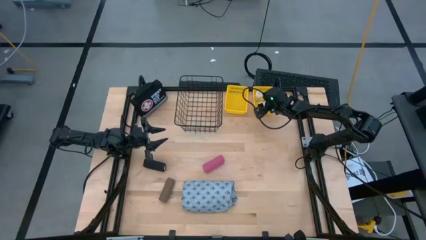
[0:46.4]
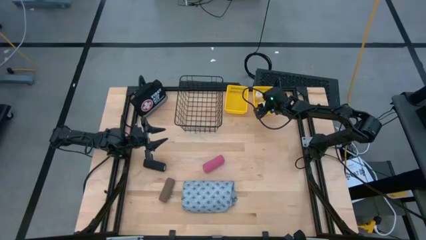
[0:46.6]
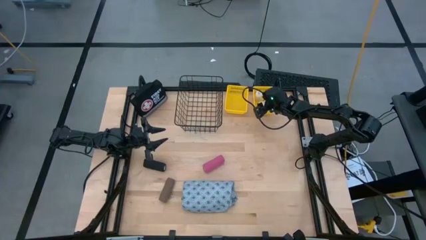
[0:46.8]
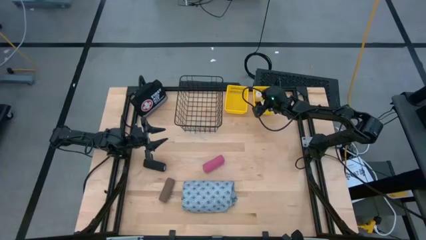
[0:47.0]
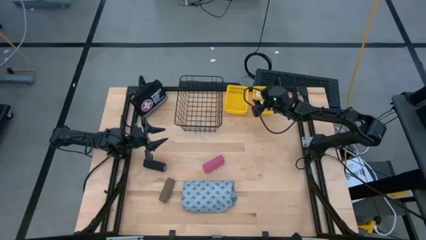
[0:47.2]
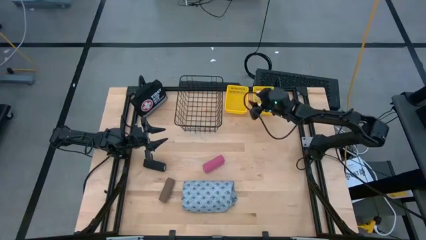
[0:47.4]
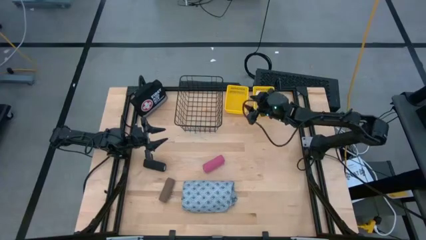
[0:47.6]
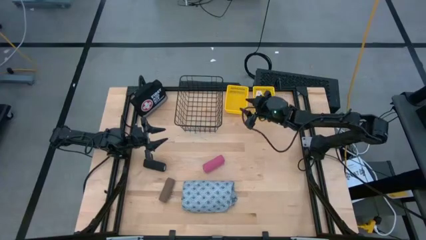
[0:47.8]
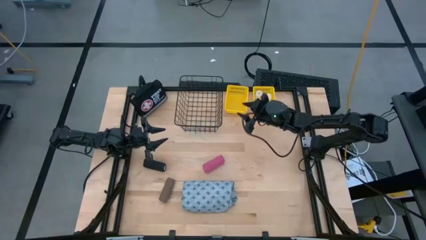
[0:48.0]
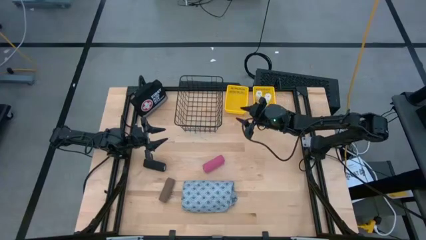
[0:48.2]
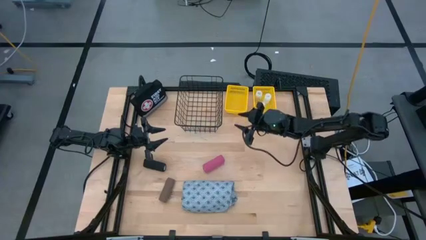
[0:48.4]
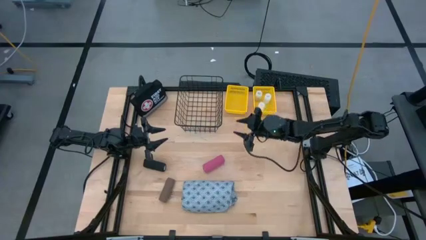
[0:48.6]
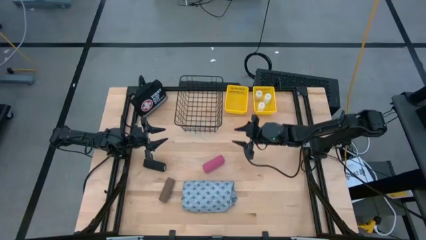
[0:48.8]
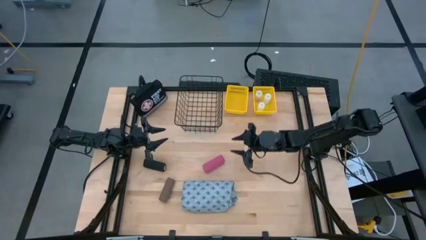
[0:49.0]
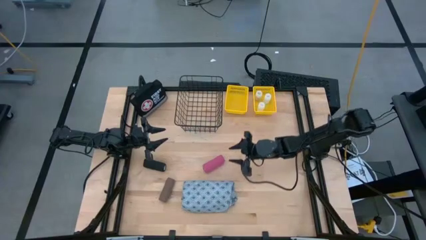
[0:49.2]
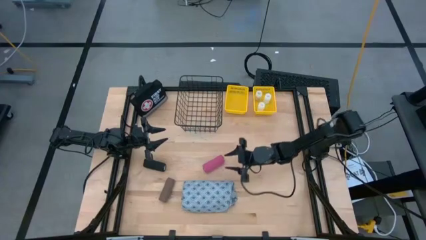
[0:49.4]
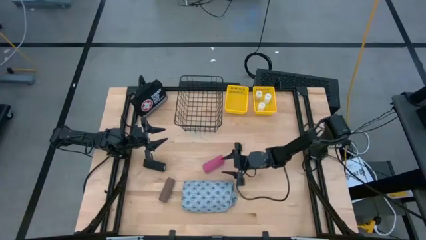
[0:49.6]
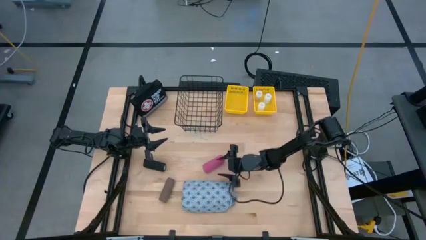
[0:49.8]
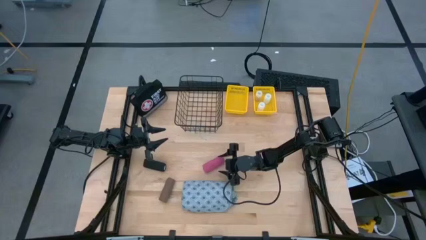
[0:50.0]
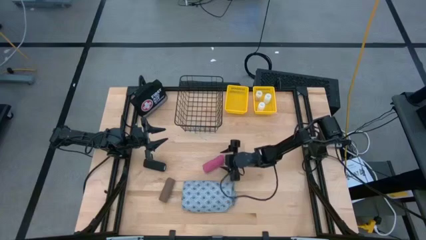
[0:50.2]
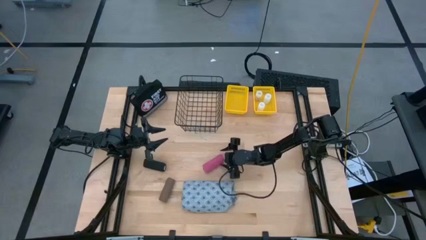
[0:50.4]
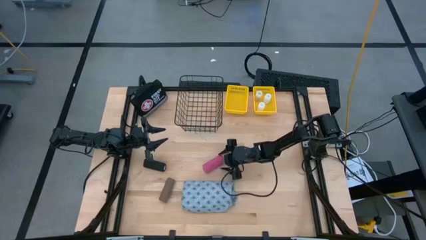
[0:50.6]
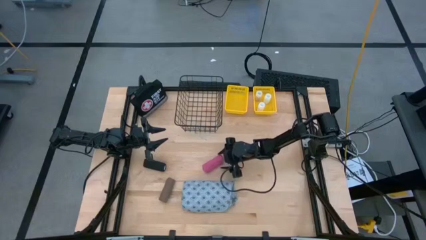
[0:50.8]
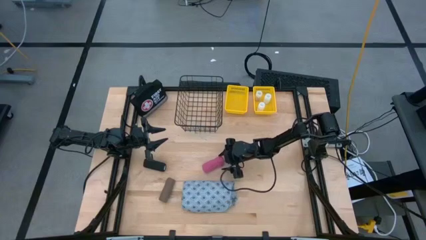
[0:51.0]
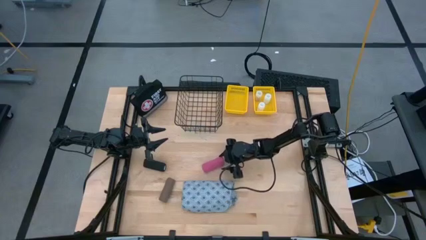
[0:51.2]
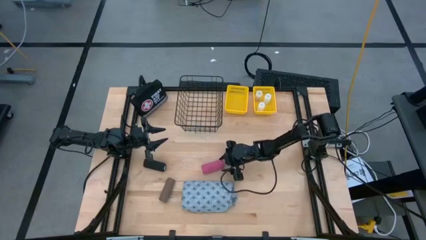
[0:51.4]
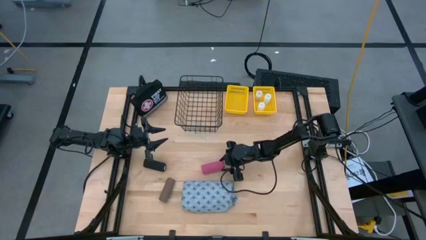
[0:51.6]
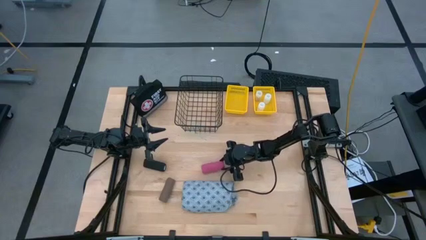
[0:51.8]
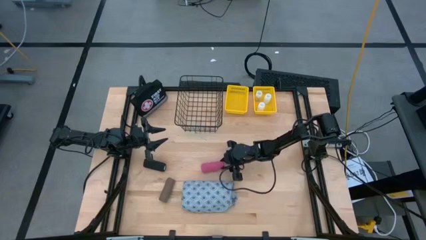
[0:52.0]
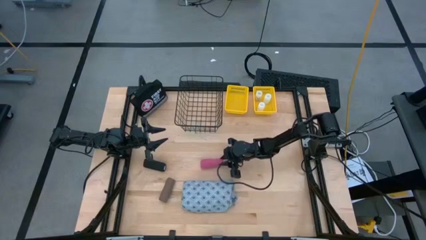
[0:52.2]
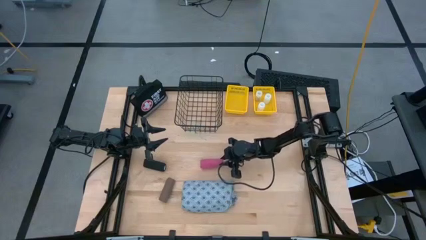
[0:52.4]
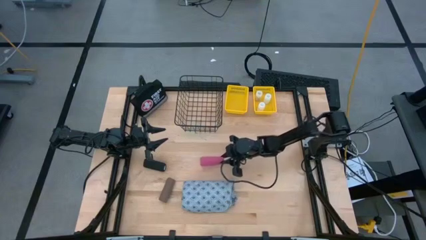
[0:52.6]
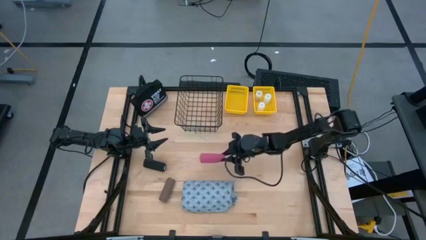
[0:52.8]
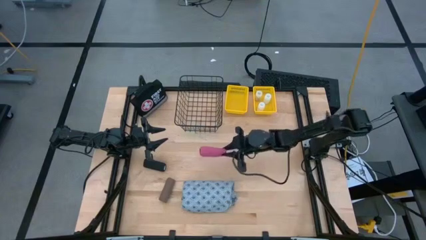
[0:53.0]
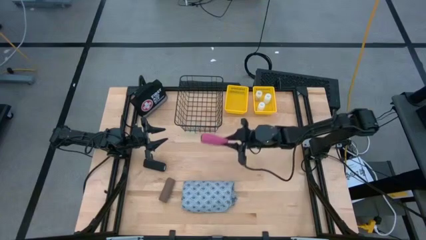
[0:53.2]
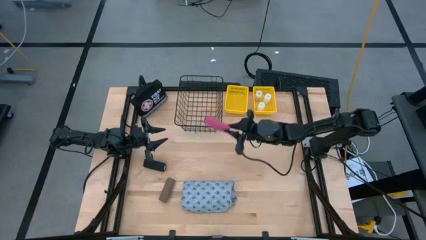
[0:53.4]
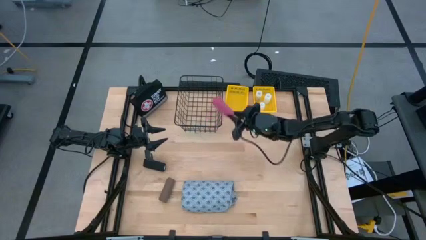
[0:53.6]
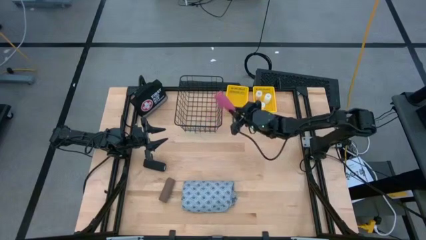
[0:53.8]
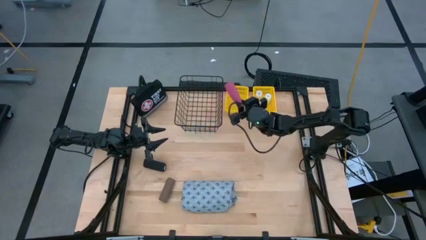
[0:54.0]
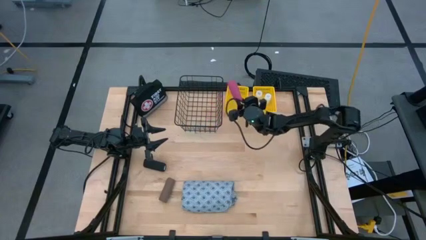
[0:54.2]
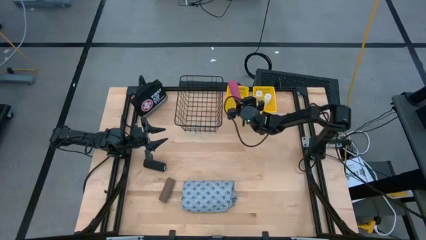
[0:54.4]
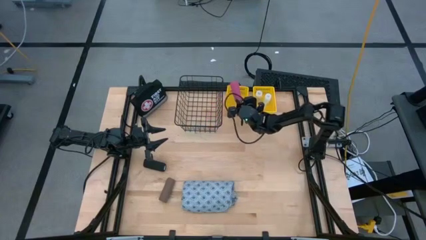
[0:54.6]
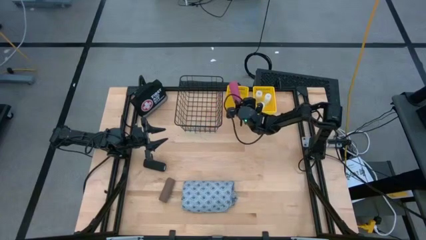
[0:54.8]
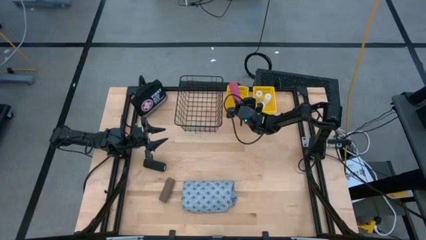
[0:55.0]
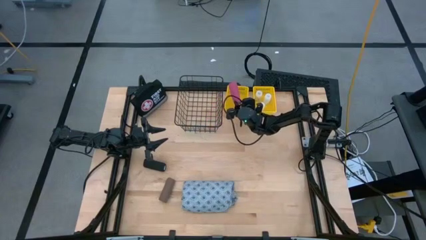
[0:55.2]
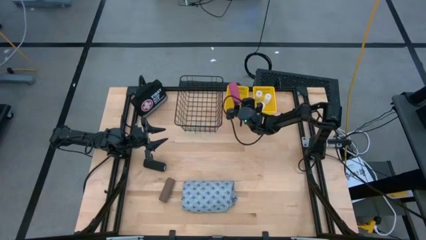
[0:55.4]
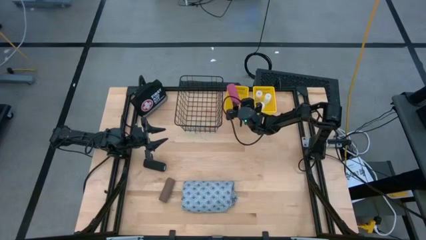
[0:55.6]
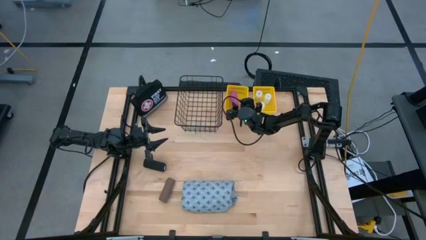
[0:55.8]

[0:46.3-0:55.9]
Task: Pick & Place Medicine items
Put the pink bandage into the left yellow basket

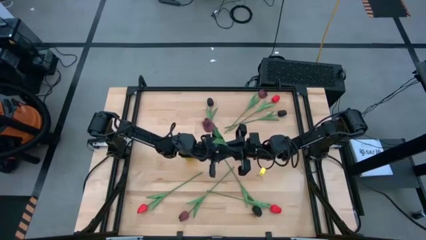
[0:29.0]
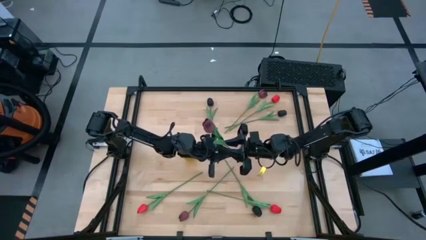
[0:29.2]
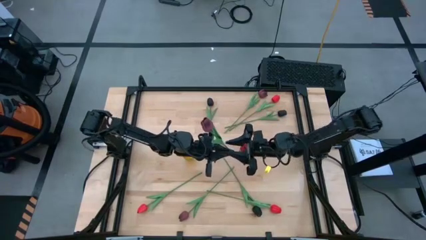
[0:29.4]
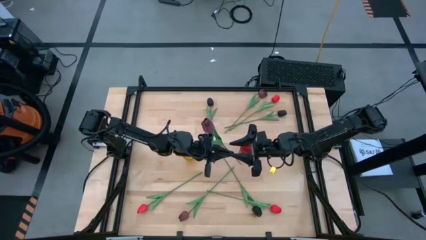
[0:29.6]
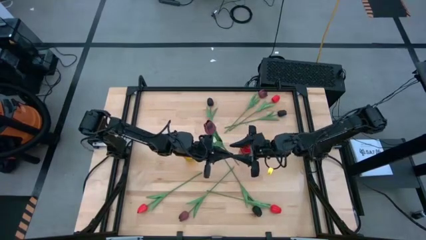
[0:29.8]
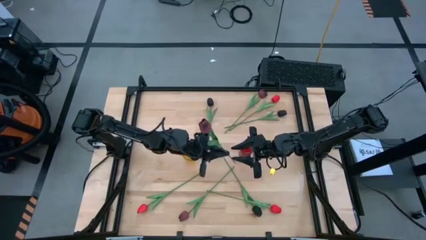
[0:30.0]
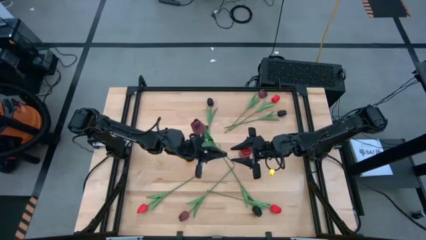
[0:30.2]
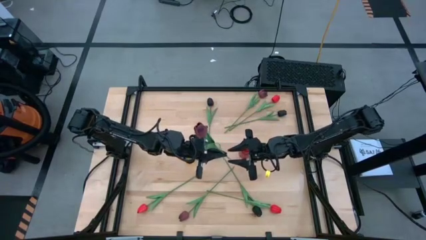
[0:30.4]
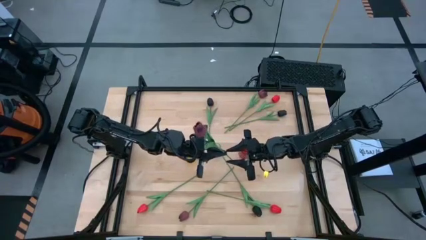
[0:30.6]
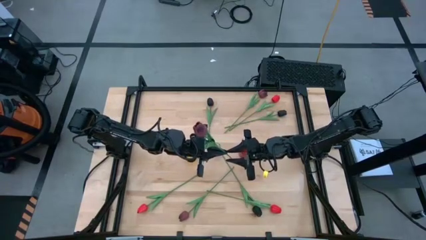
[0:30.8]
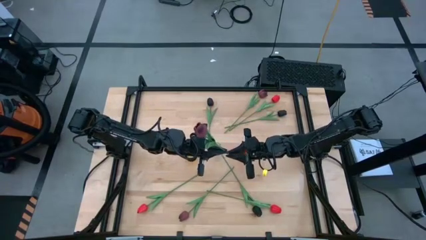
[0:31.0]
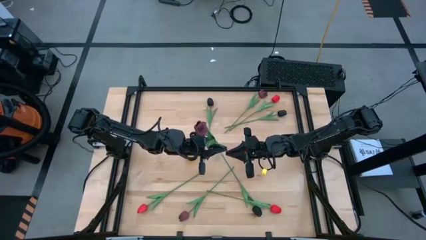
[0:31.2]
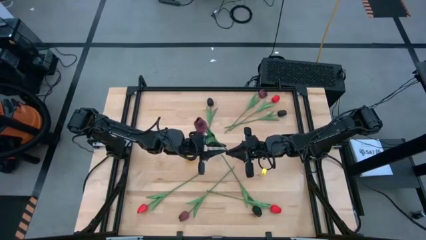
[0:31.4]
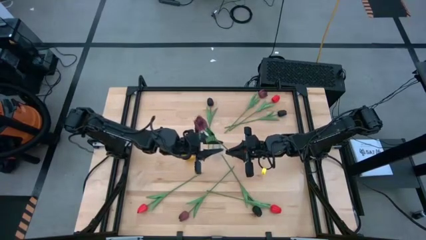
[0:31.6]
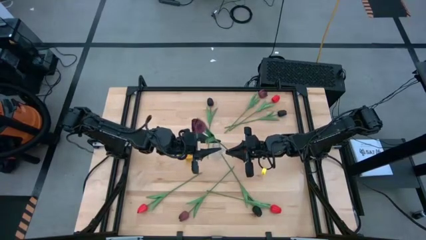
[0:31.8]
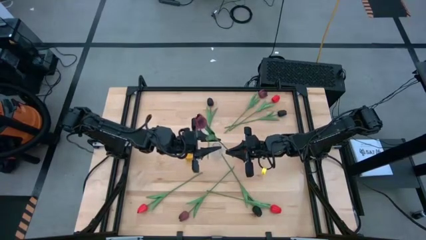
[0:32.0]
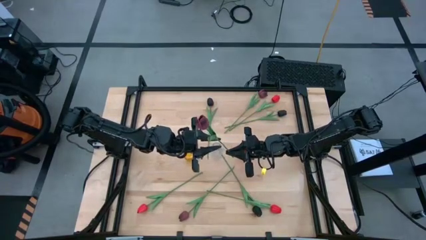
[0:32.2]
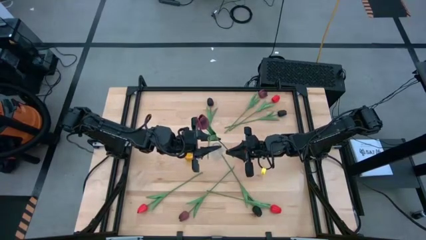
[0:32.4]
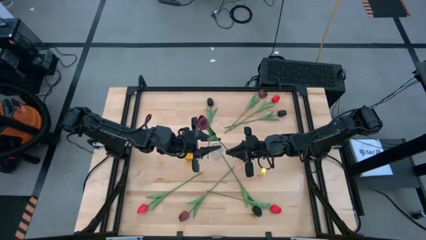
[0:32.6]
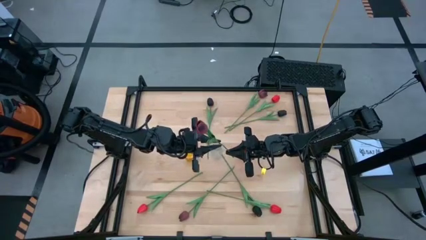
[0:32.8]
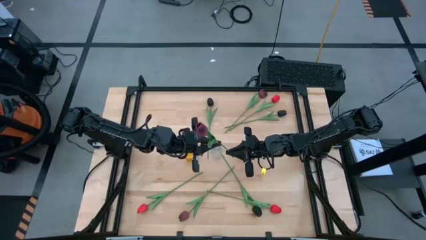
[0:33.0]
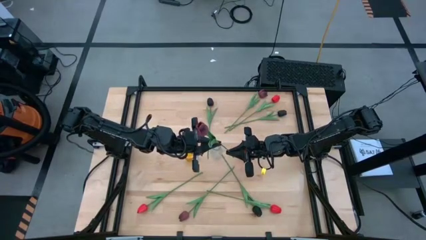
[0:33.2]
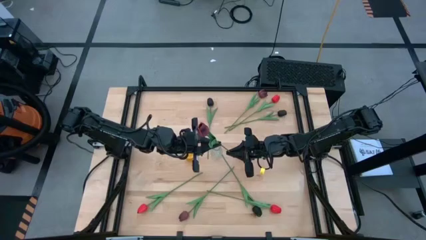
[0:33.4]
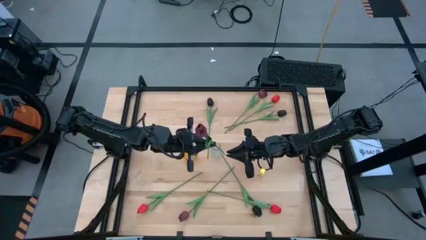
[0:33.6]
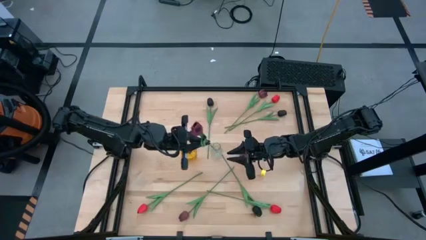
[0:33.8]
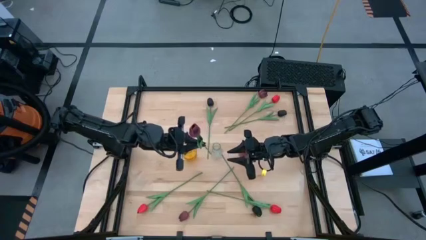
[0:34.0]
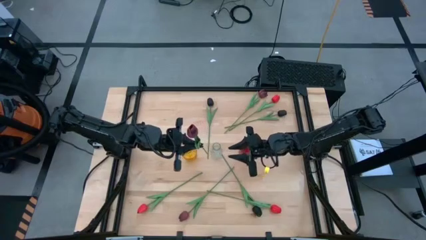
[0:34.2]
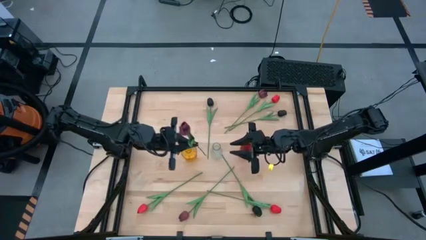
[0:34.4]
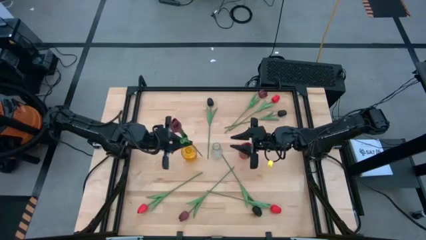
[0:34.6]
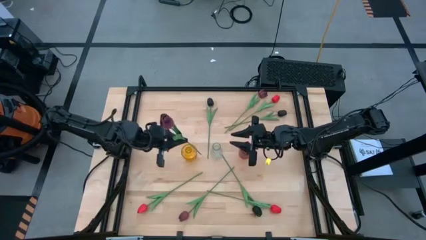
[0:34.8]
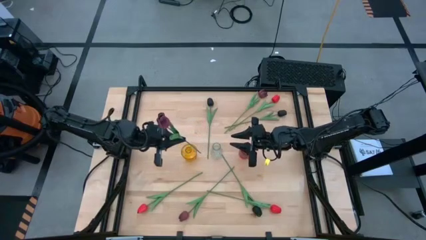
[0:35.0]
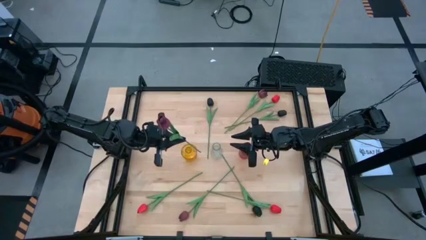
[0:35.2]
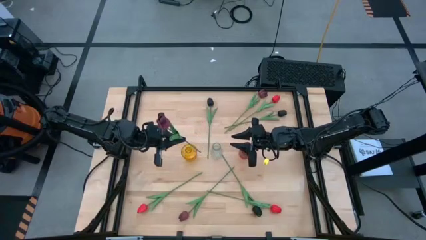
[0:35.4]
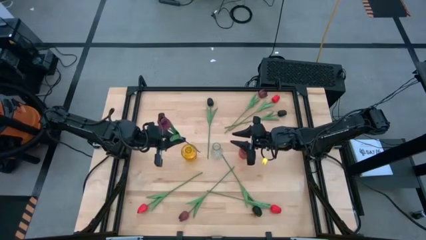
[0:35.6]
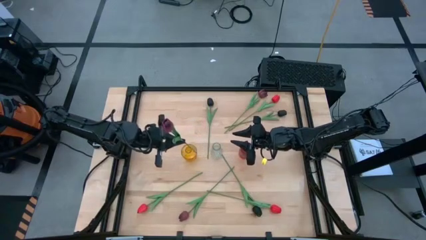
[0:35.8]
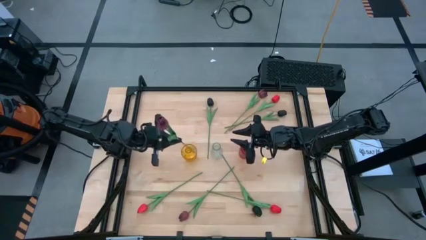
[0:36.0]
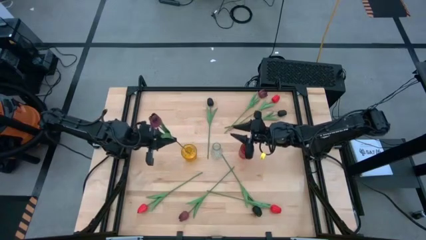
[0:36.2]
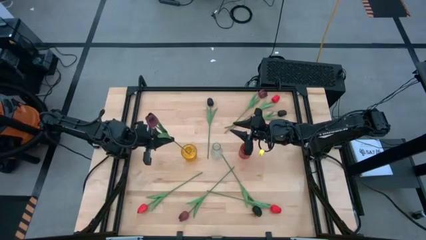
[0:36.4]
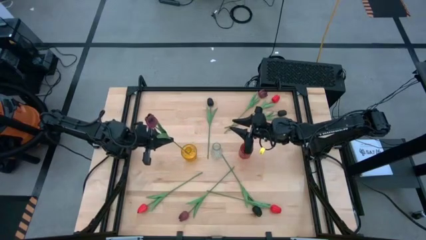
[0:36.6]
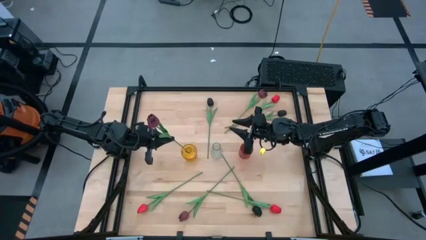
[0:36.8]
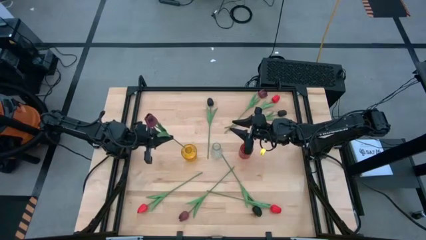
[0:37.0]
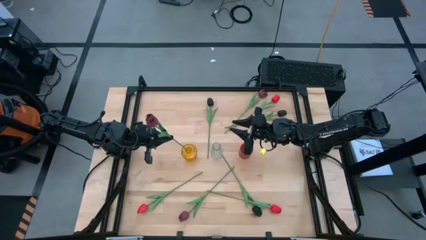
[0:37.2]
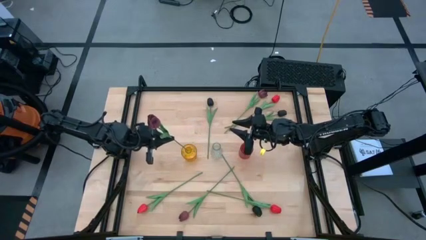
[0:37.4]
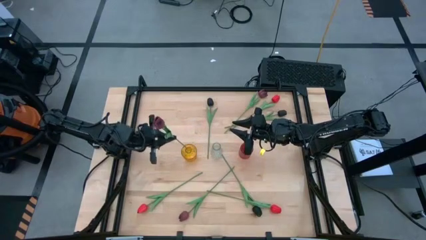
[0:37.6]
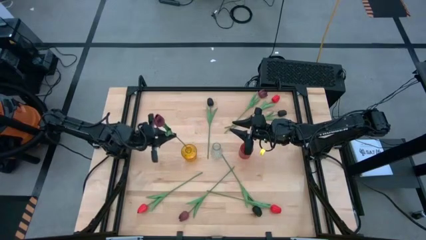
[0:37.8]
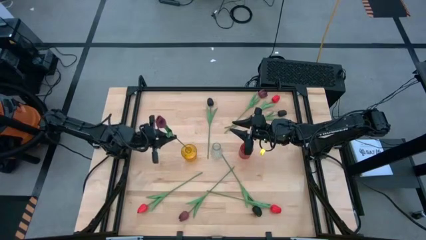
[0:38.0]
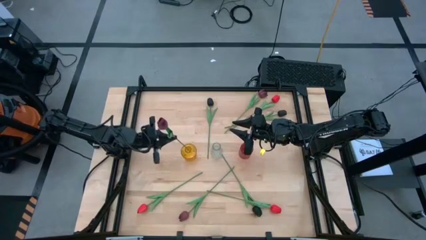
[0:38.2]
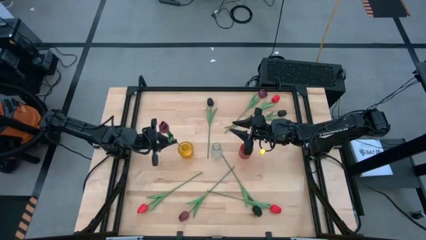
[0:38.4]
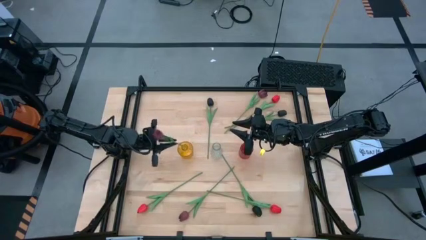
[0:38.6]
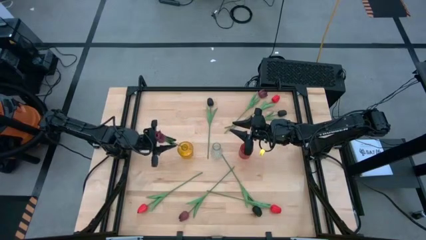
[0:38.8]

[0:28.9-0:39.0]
Task: Sort flowers into vase by color
Put the top left red tulip into the yellow vase
